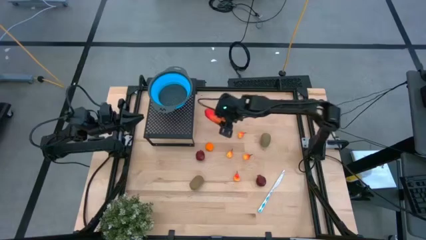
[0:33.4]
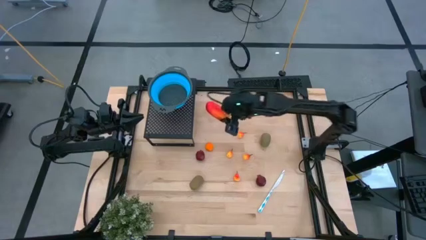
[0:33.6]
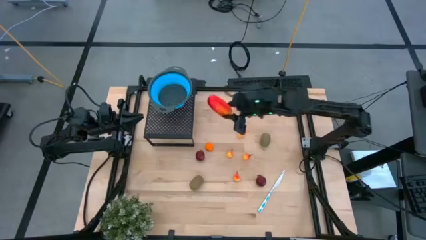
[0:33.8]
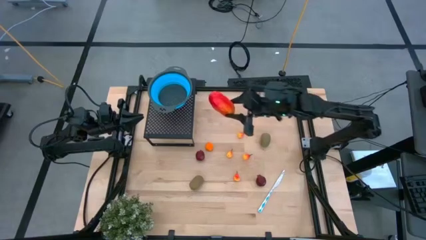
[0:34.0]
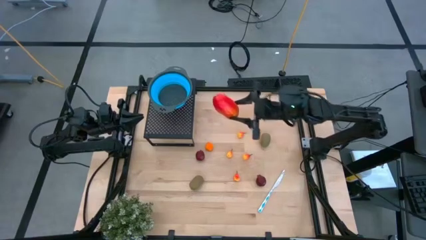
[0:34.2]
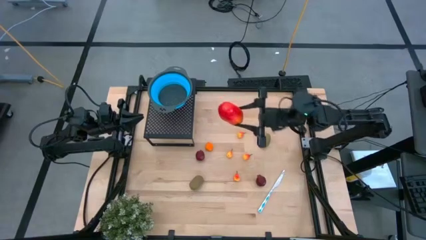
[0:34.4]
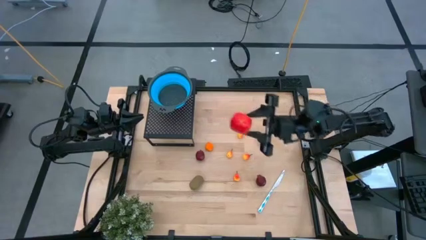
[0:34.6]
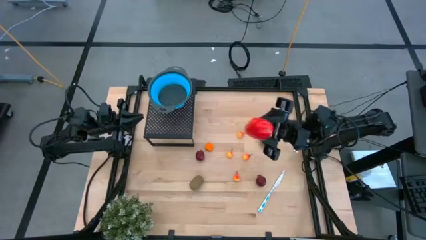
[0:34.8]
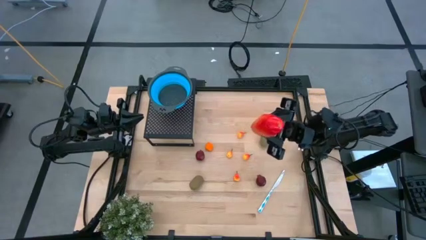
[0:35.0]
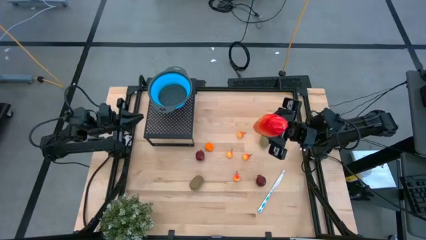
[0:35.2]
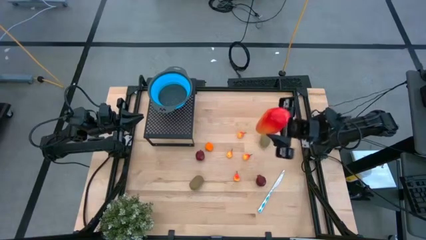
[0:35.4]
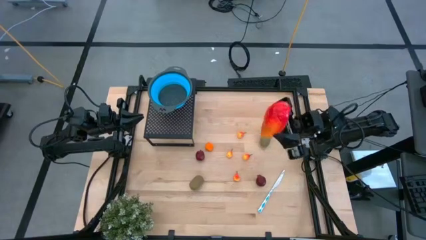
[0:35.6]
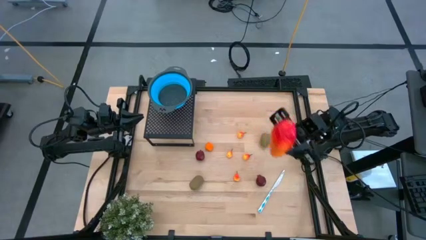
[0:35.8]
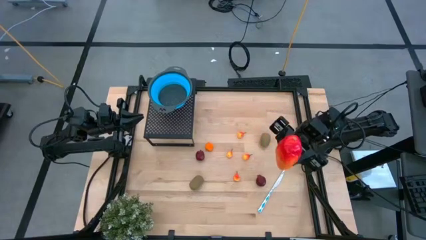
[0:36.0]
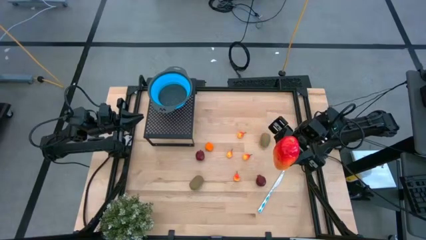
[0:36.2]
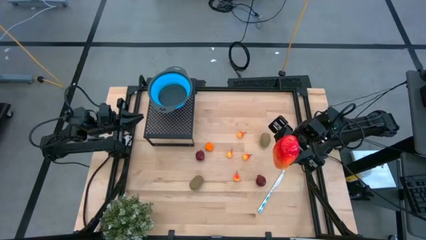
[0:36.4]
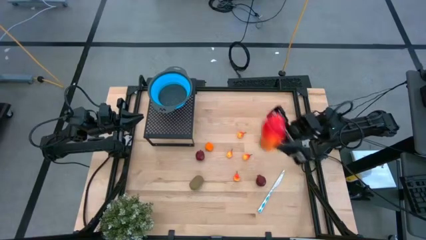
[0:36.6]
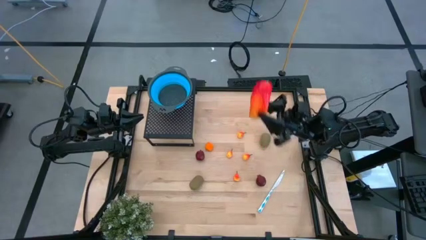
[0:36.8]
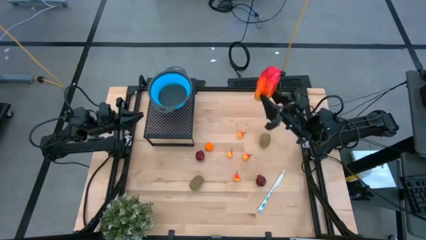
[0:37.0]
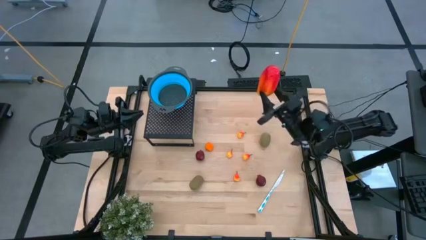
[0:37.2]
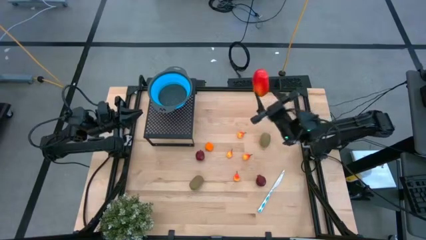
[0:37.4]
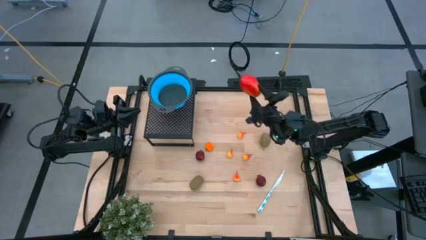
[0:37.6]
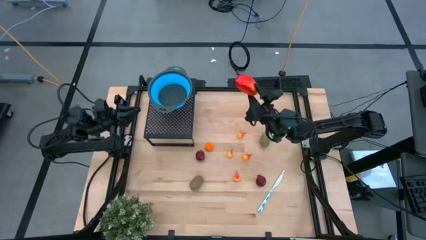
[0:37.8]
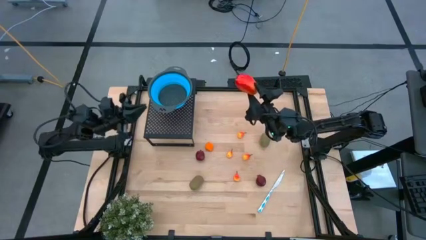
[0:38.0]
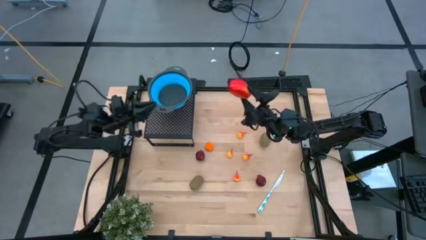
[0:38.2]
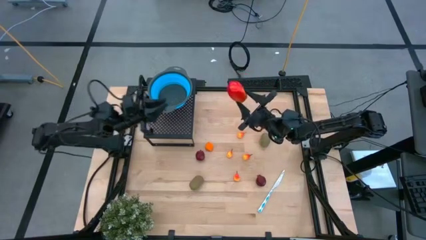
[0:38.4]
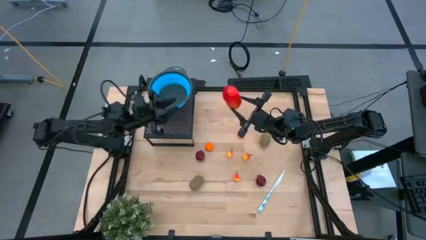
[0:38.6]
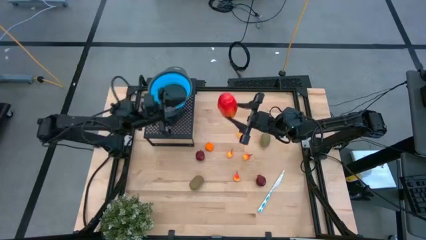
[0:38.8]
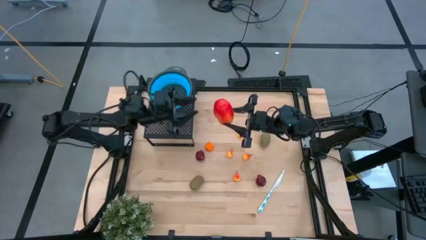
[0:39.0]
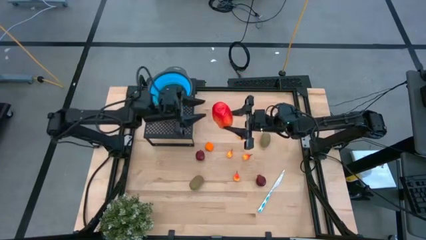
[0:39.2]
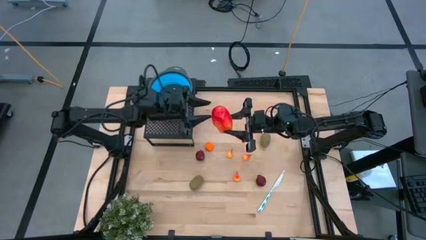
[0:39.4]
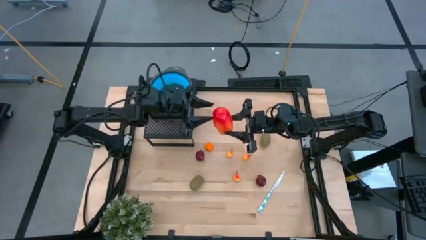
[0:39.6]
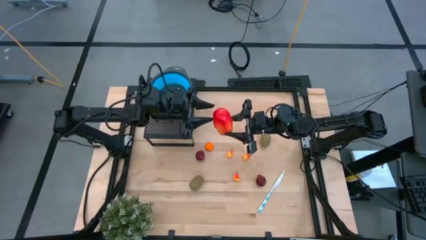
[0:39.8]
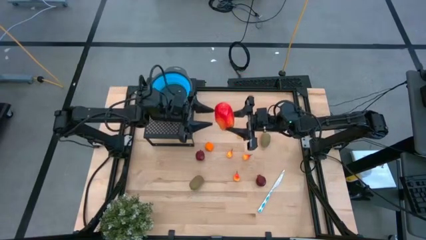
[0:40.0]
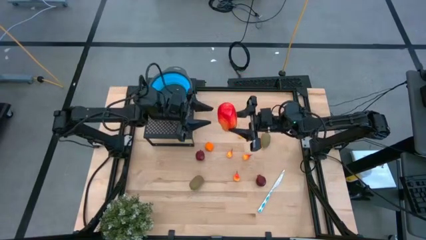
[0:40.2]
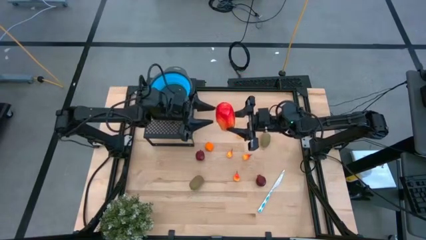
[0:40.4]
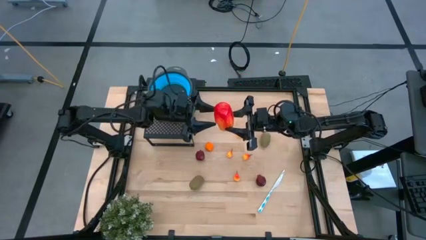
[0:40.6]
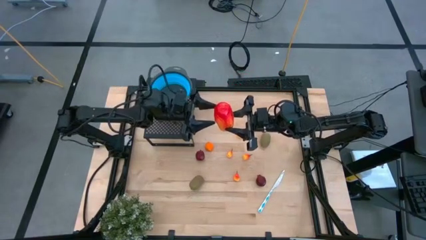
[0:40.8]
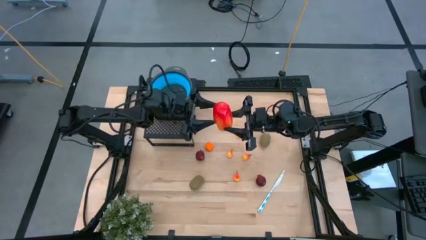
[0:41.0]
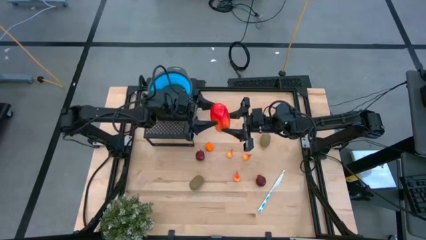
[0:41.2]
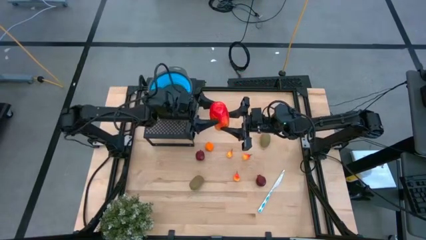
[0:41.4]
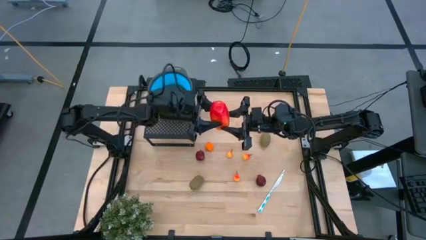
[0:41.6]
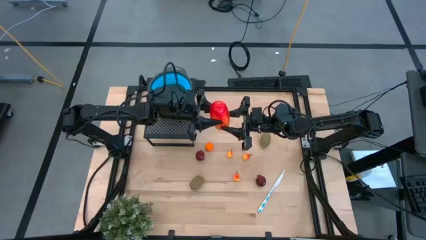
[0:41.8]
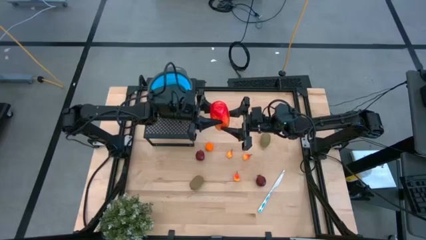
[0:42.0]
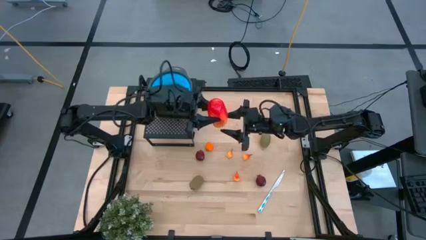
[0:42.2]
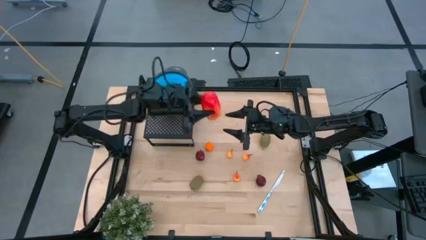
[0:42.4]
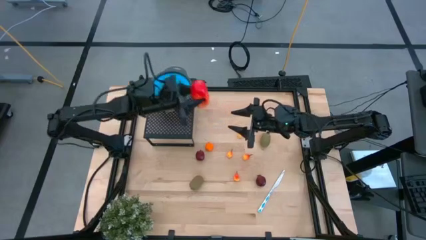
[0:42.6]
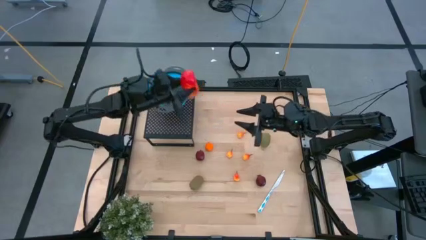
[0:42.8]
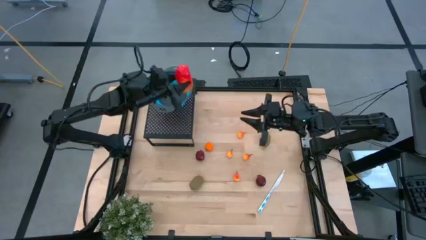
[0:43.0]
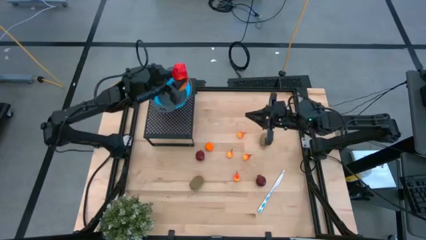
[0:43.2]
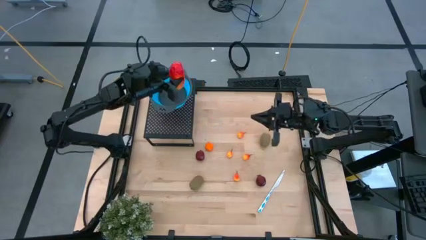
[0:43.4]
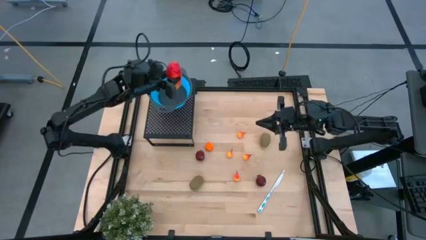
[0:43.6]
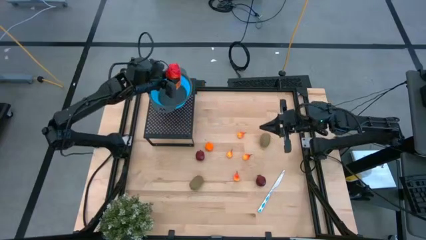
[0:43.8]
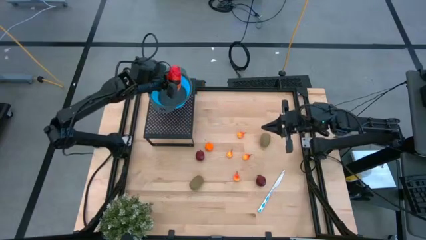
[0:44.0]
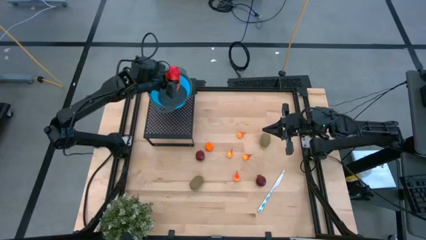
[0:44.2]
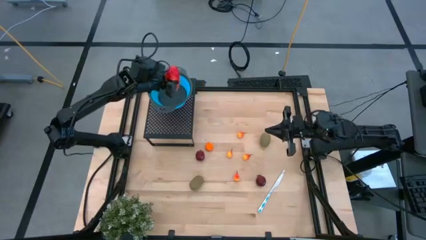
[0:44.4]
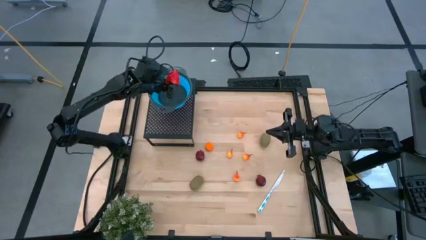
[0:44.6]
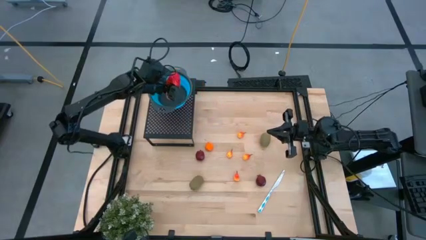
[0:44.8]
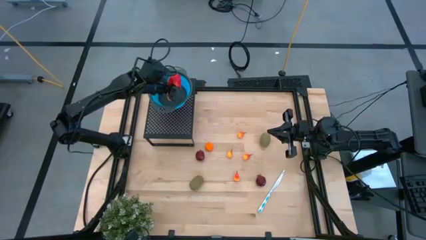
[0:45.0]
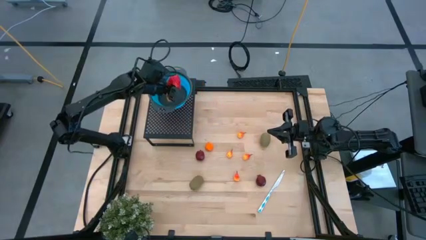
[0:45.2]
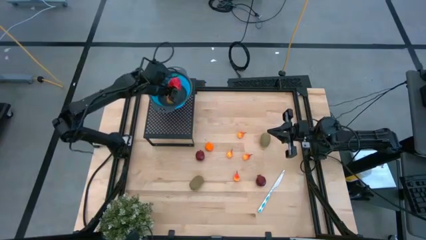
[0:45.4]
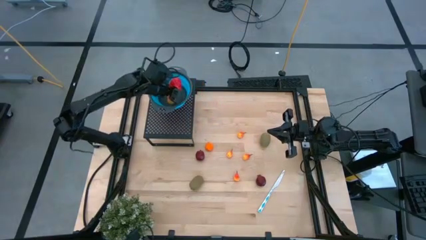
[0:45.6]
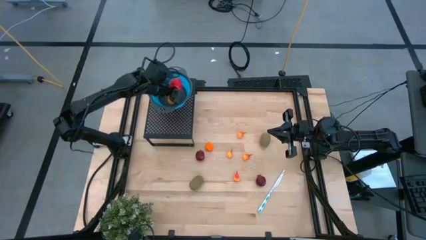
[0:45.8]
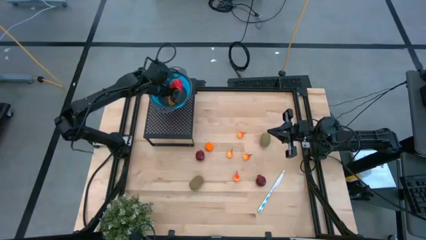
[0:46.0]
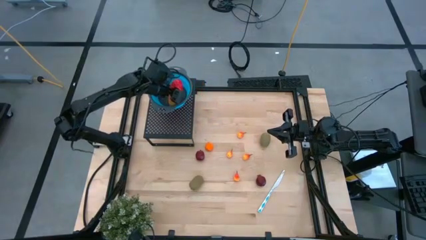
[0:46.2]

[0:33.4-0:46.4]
Task: Pick & Place Fruit
Put the mango into the blue strainer bowl on the shelf

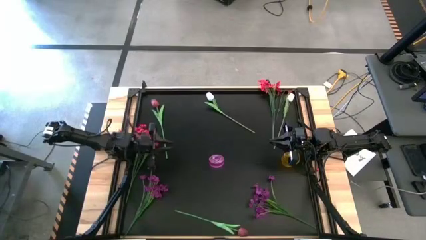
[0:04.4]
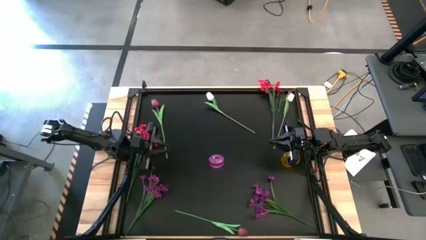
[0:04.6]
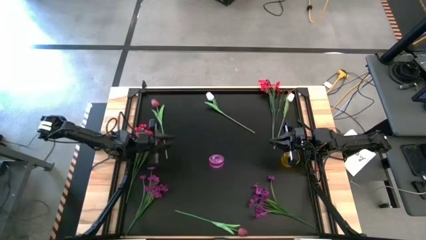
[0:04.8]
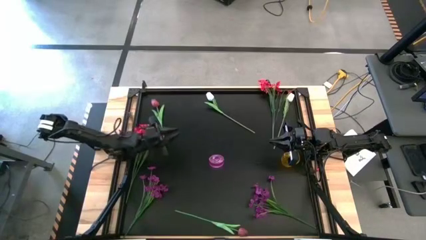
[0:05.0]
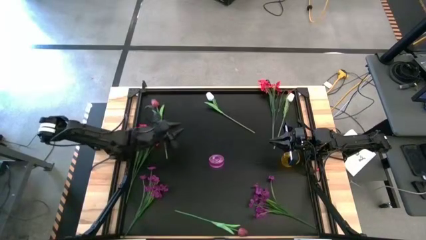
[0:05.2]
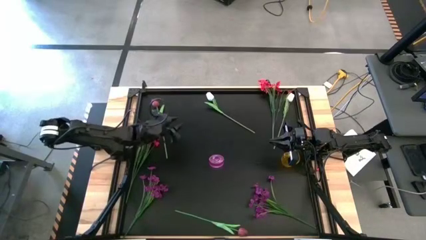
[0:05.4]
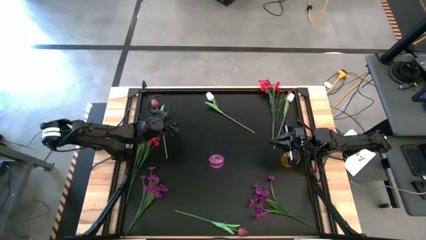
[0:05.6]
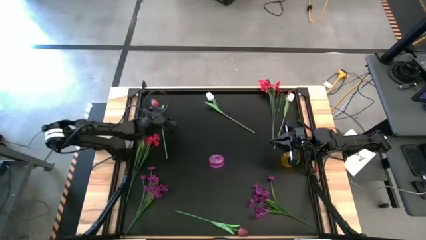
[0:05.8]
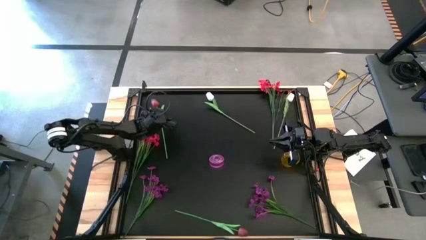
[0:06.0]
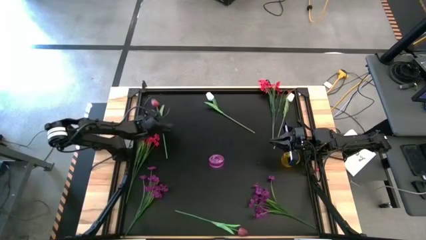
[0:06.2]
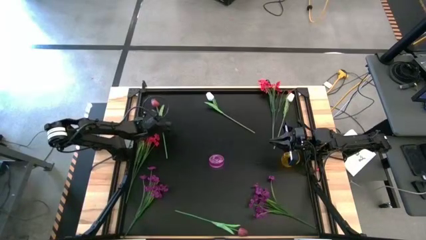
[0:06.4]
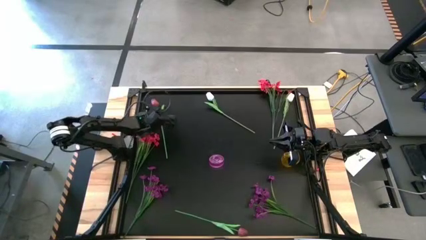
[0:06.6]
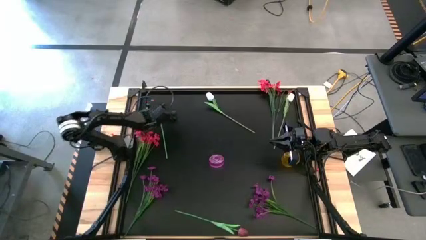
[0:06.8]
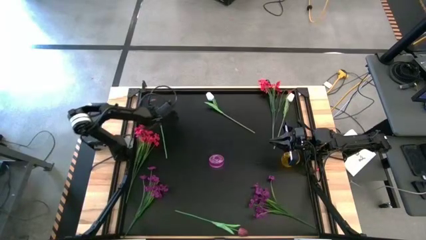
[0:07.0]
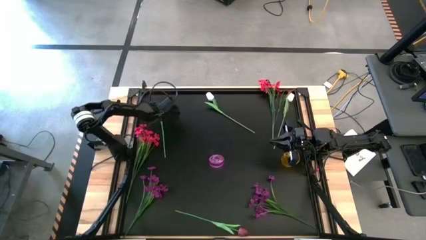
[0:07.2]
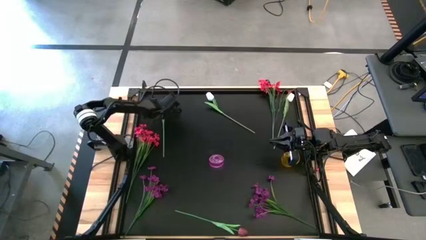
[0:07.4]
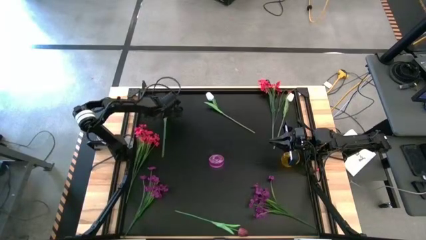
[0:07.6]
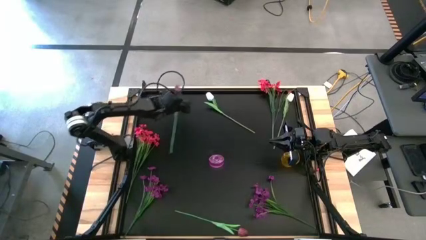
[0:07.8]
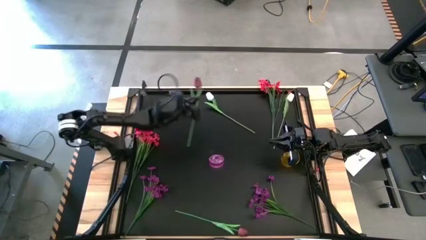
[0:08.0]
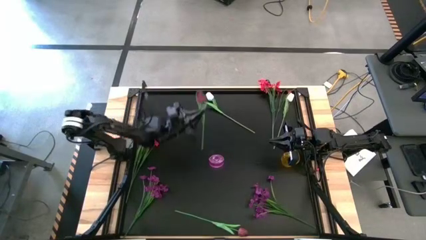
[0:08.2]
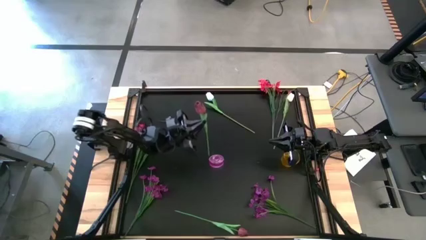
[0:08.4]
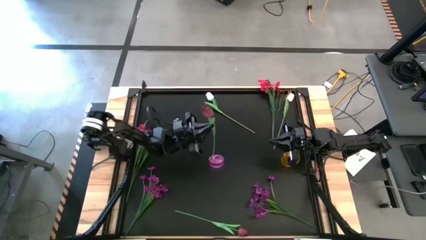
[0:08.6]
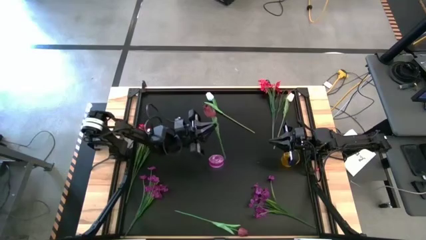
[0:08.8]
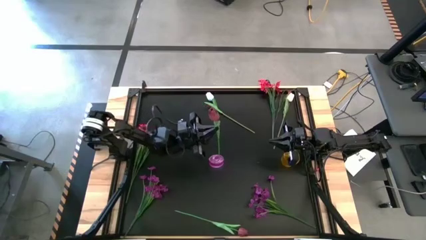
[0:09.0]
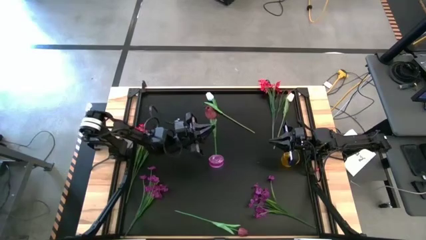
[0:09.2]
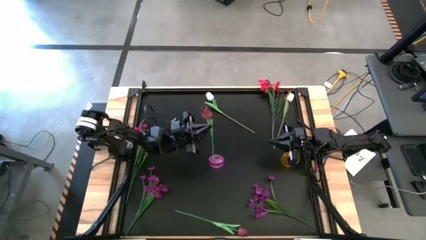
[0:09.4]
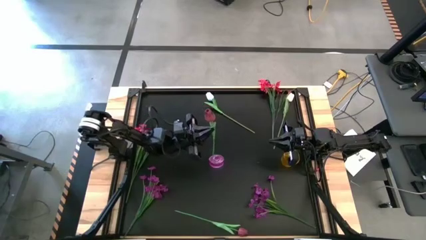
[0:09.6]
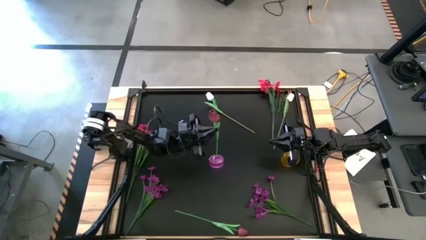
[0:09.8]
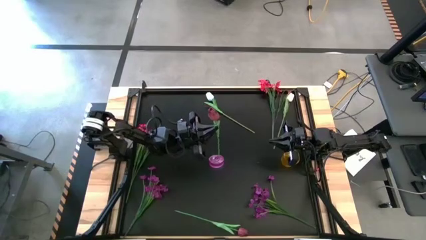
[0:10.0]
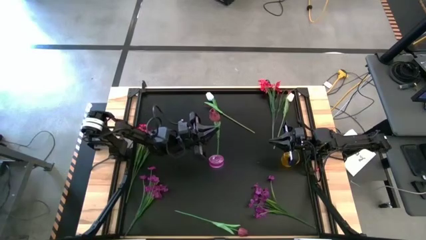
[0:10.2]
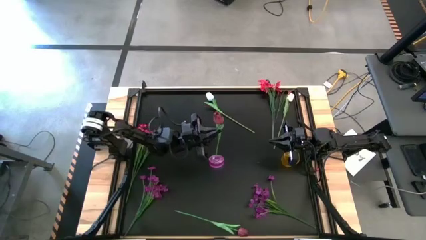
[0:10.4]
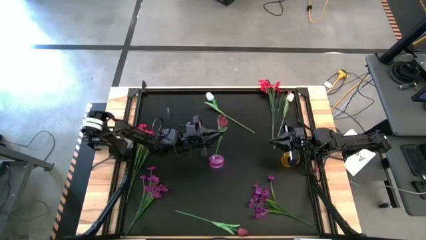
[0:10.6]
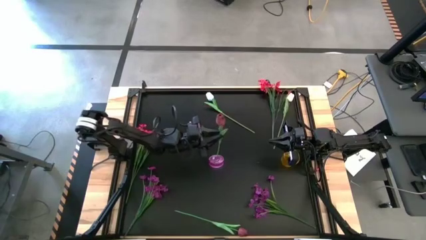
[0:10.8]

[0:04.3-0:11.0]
Task: Sort flowers into vase by color
Put the top dark red flower into the violet vase
